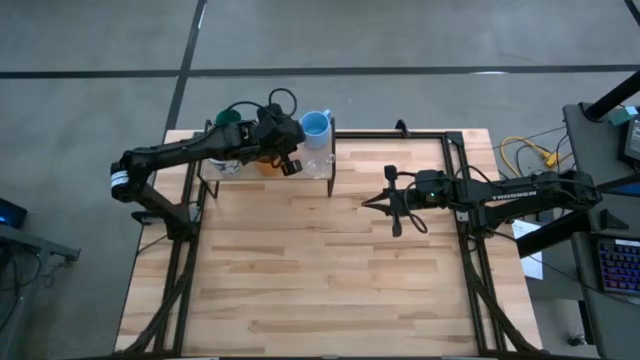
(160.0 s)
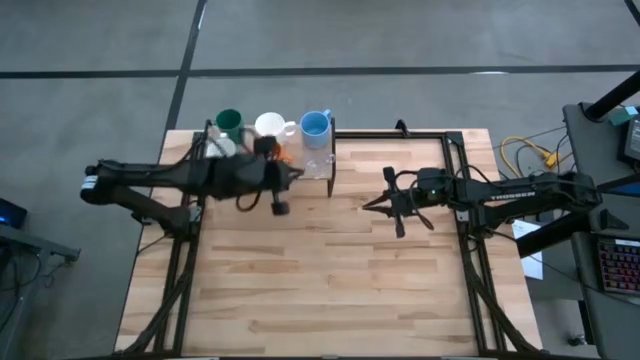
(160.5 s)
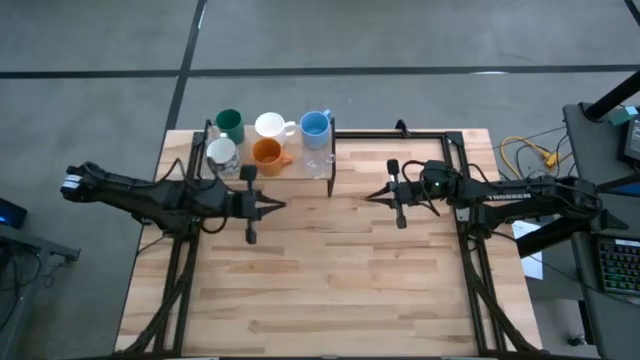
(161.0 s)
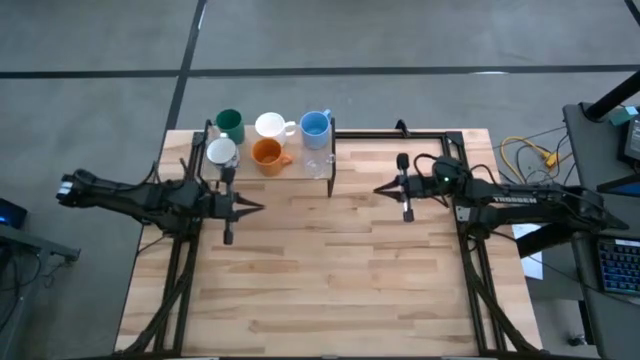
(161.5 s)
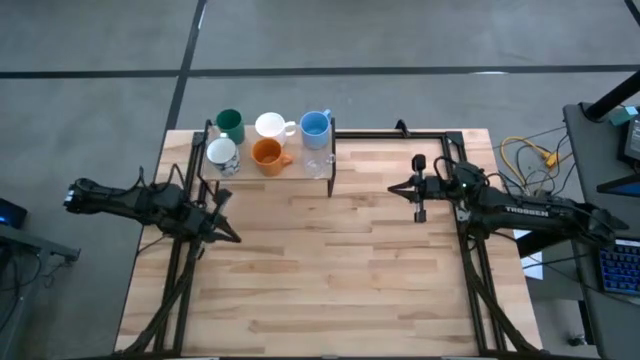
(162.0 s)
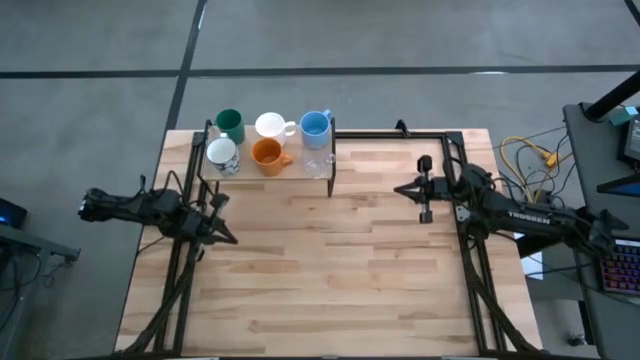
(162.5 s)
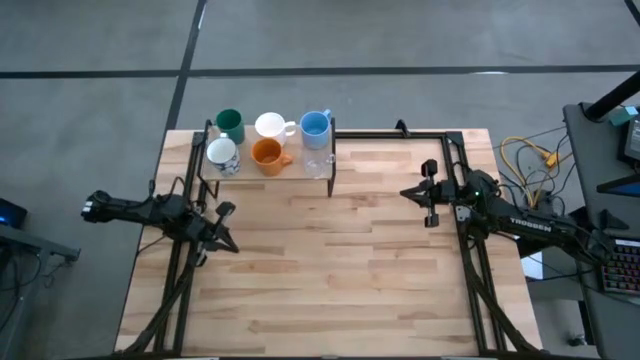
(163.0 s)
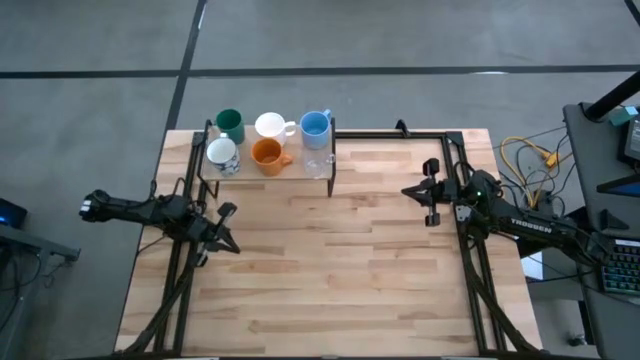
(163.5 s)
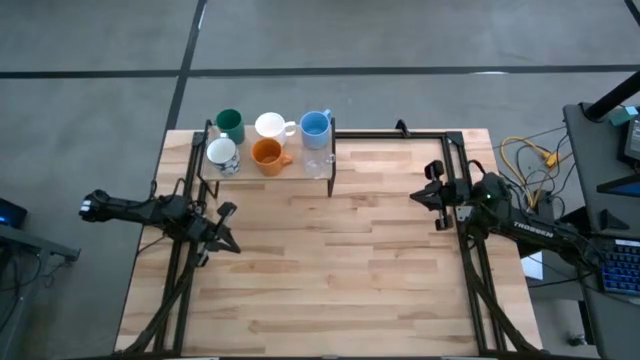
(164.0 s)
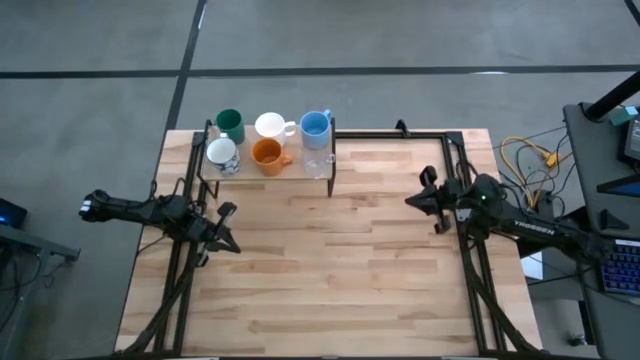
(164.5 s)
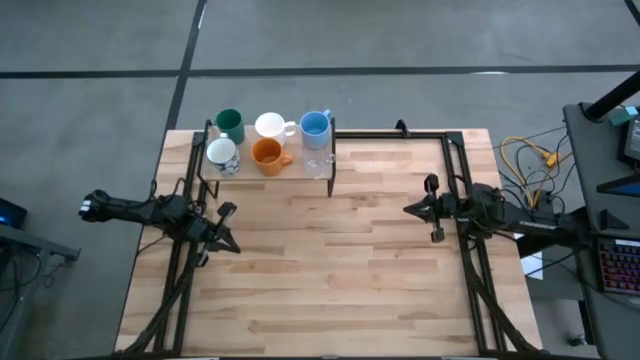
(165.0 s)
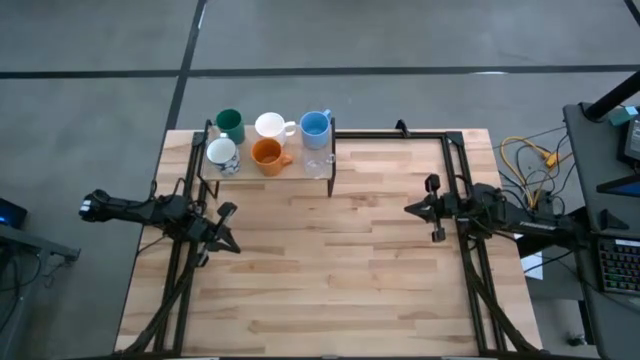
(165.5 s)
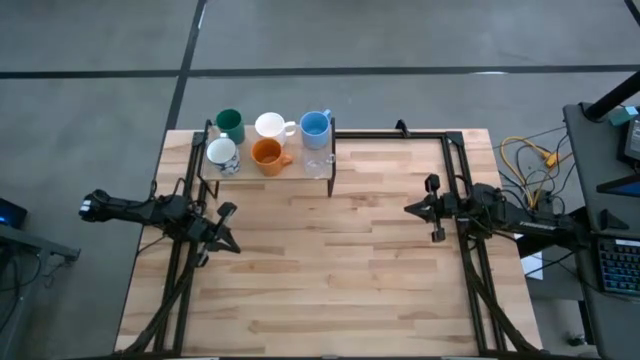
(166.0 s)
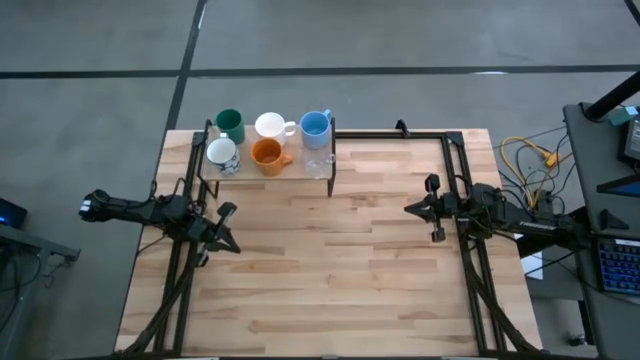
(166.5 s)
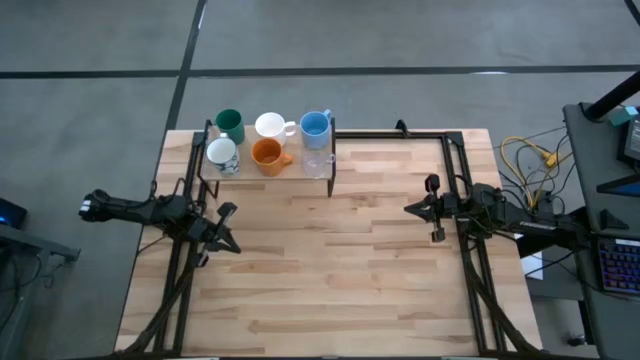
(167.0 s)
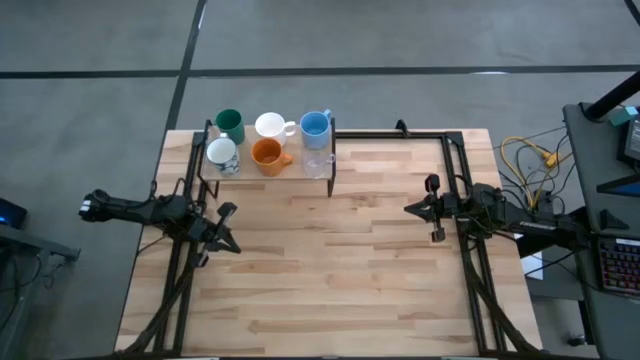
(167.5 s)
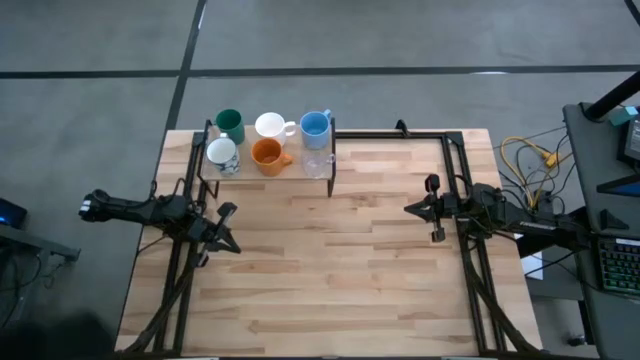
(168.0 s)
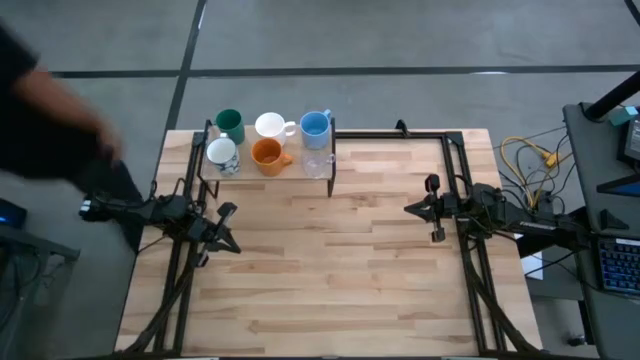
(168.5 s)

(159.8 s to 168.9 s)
Task: Stack small to large cups/mugs on shelf
Return to home position

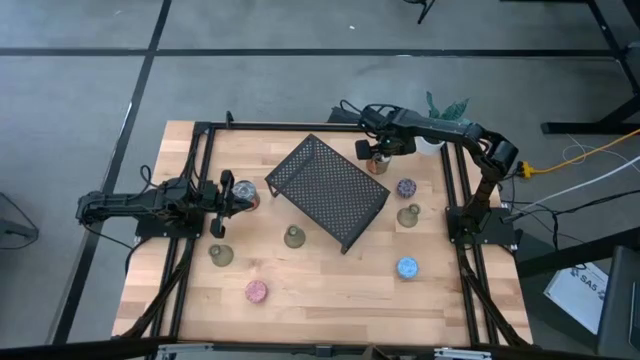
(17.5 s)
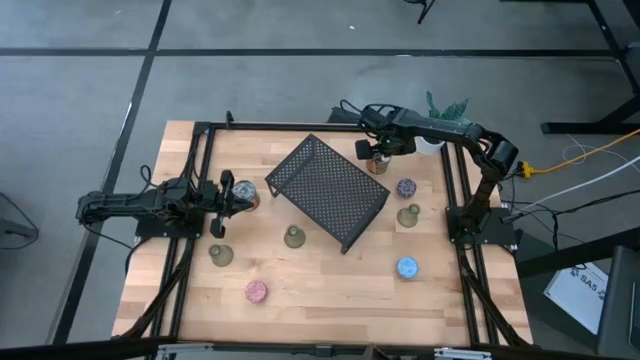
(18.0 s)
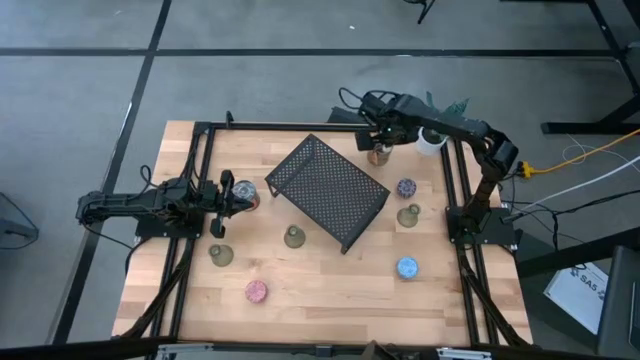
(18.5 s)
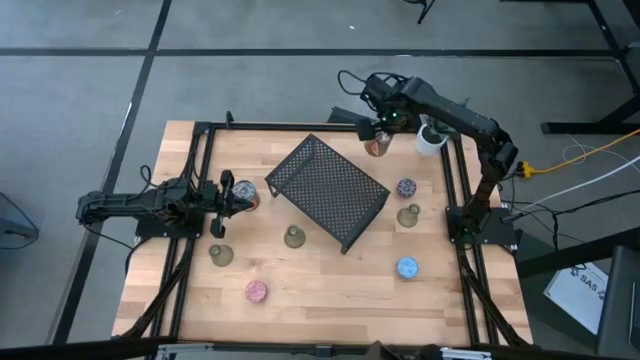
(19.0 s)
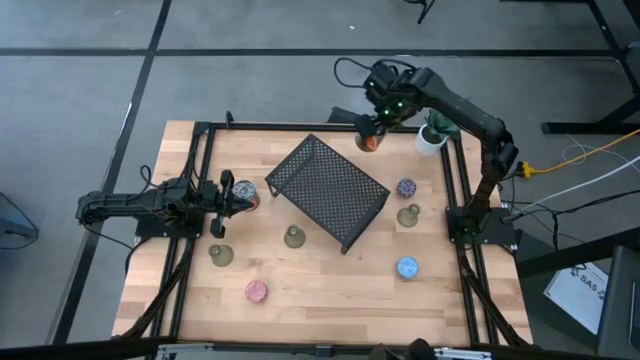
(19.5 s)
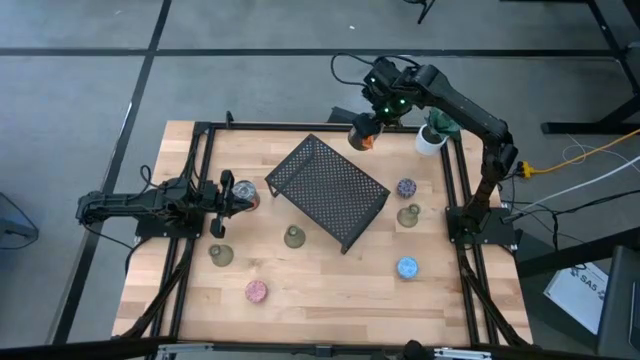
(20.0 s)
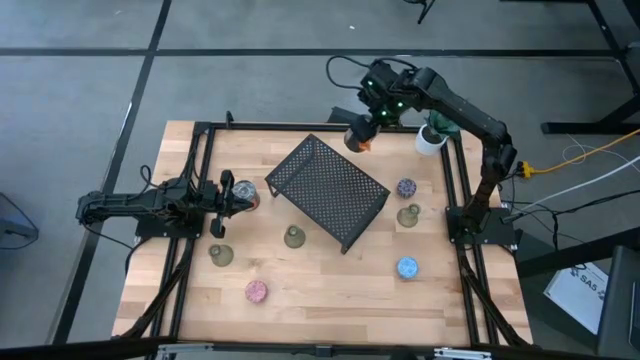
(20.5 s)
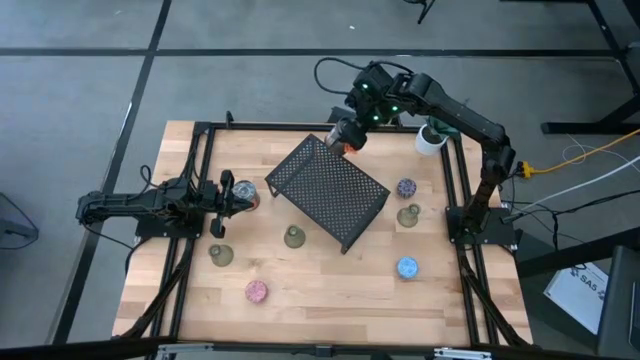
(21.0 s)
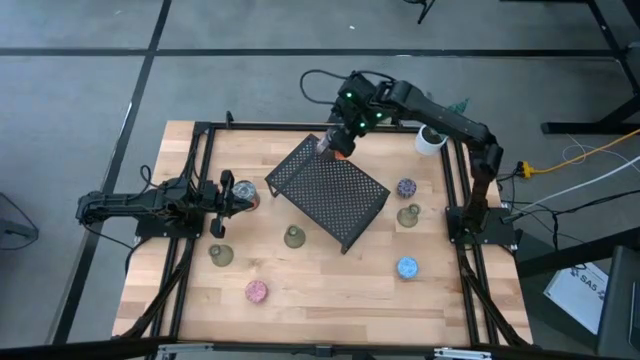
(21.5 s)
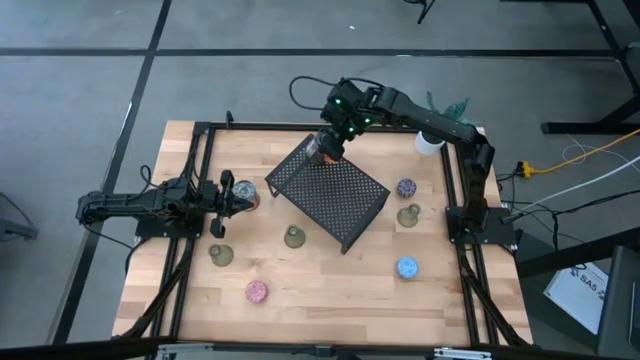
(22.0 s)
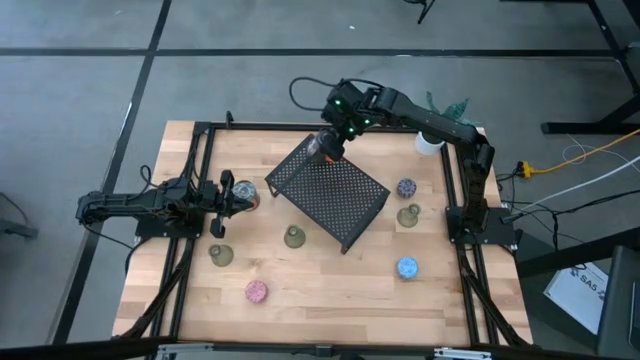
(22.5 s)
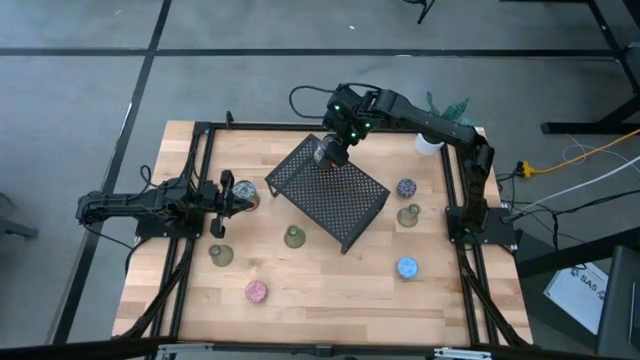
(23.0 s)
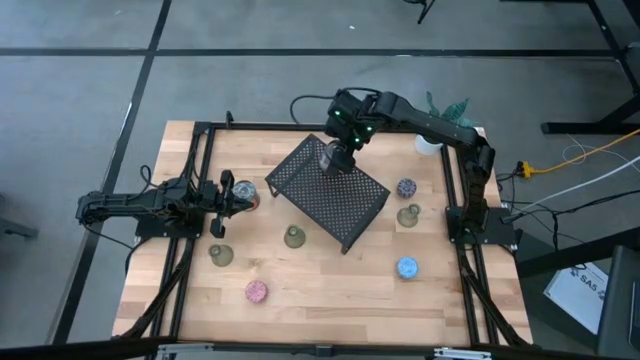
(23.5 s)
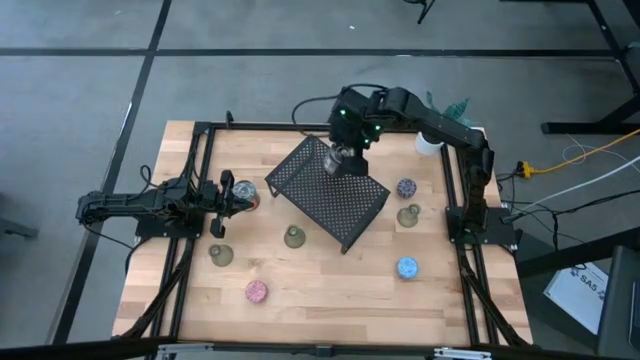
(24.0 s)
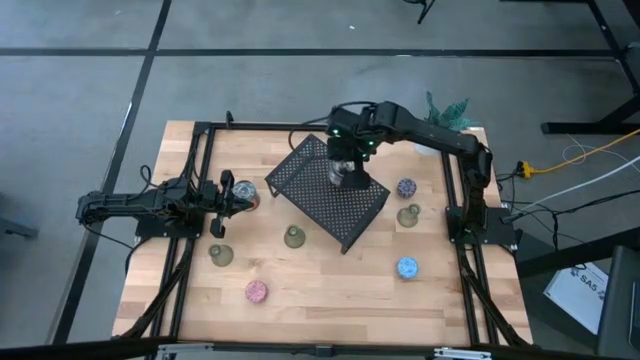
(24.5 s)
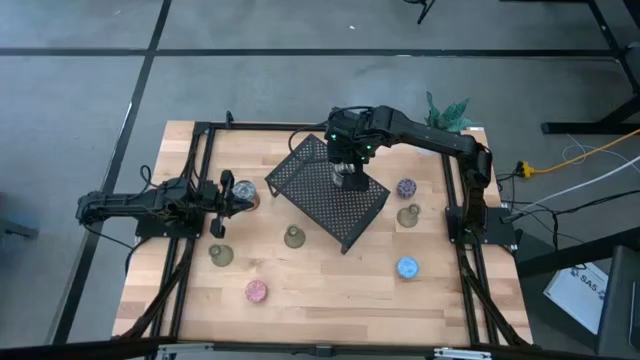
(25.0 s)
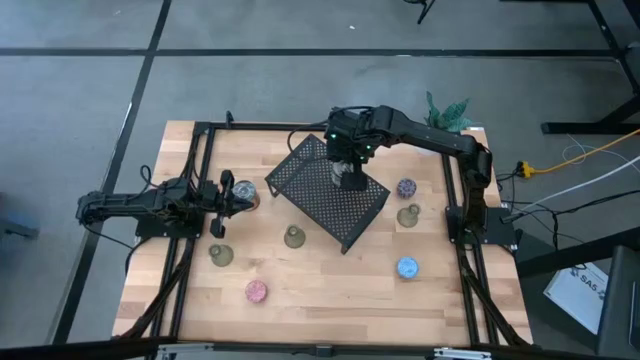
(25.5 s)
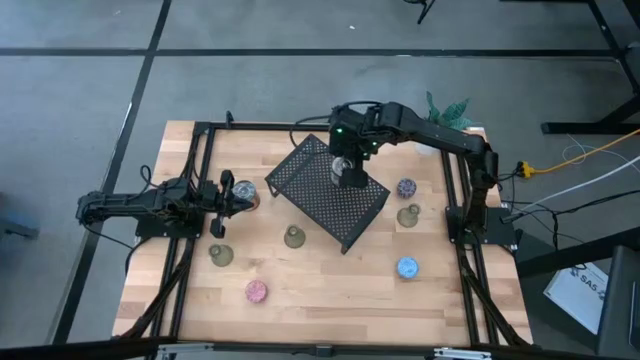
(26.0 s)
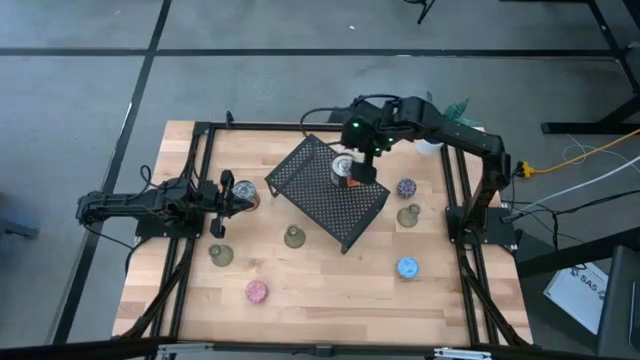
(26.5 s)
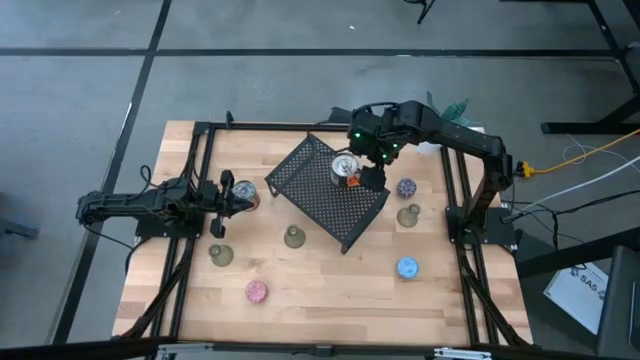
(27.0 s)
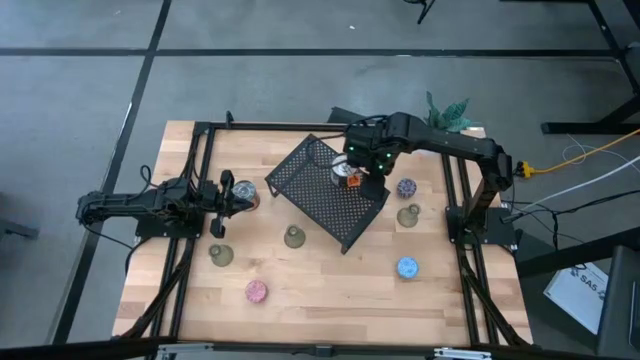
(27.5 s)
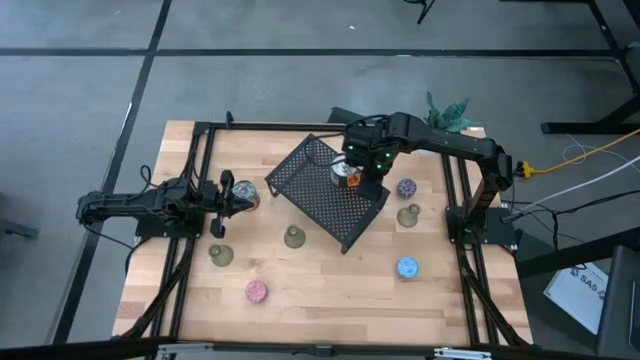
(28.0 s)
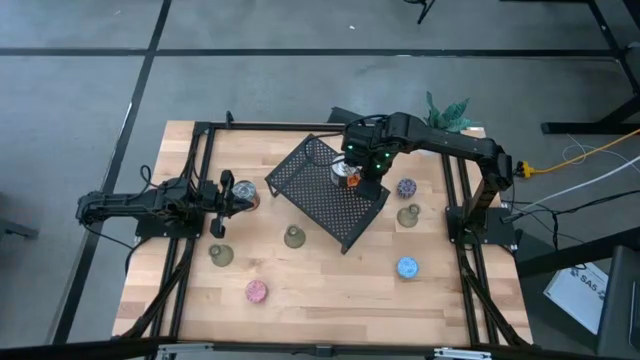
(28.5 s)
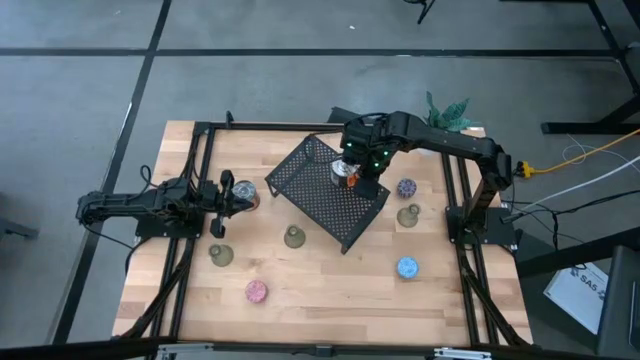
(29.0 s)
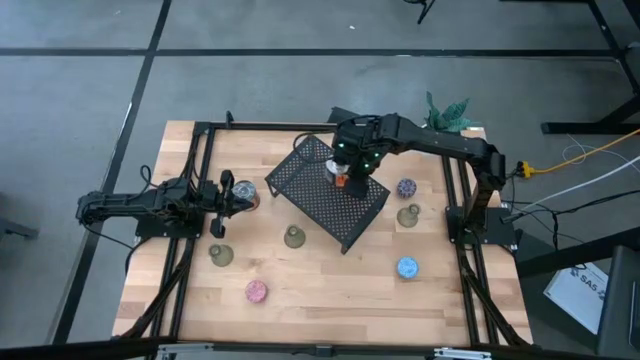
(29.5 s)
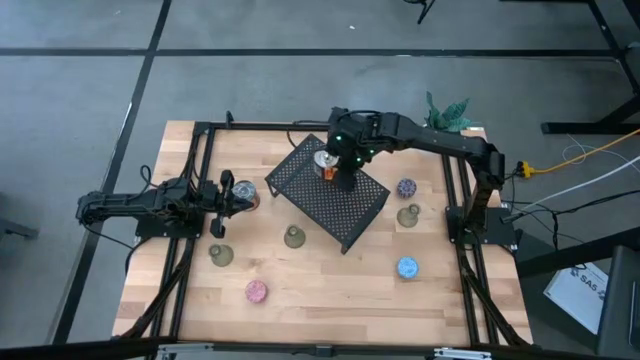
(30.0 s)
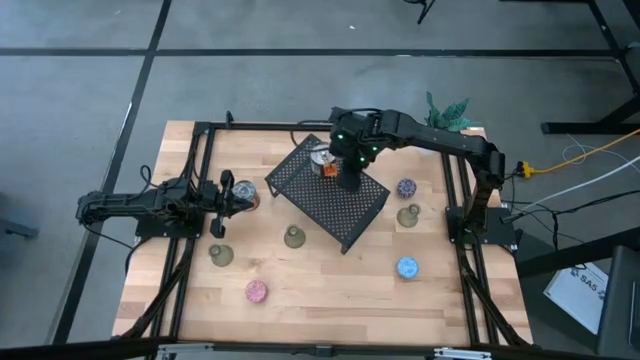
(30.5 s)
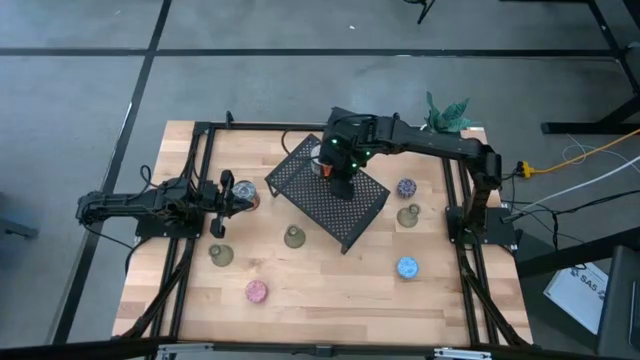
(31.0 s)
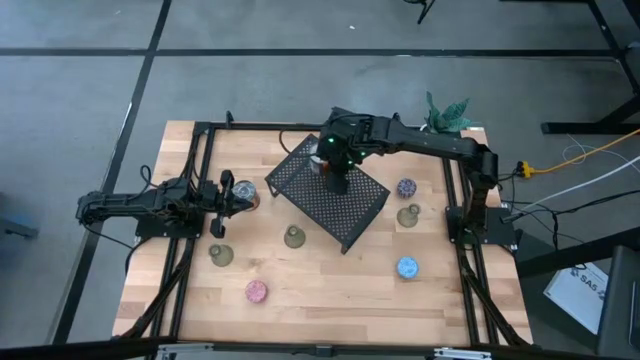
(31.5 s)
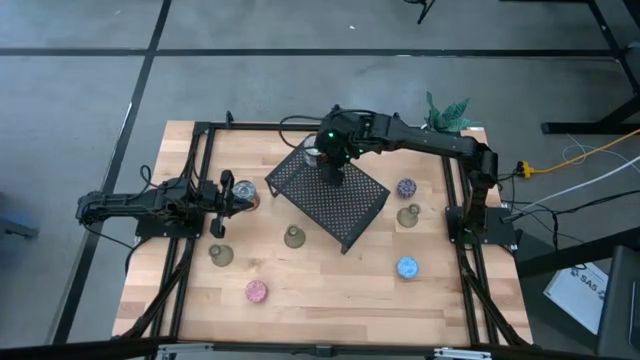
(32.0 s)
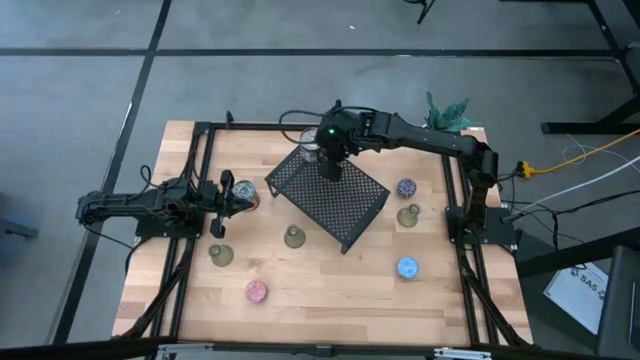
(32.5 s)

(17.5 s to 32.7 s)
Task: Pick & Place candle stick holders
Put the left brown scented candle on the shelf
